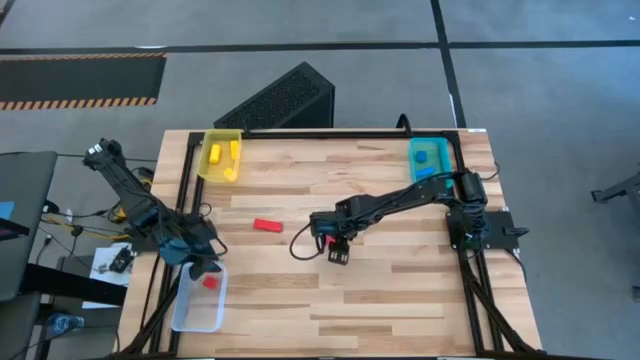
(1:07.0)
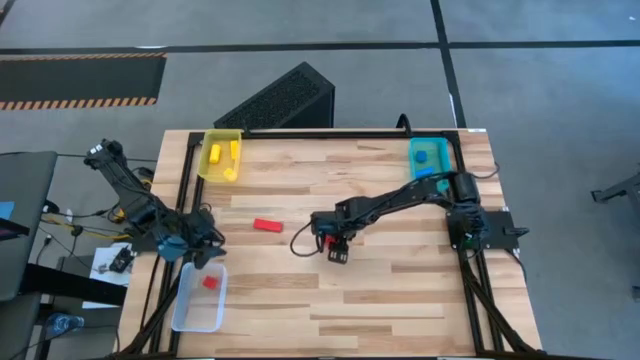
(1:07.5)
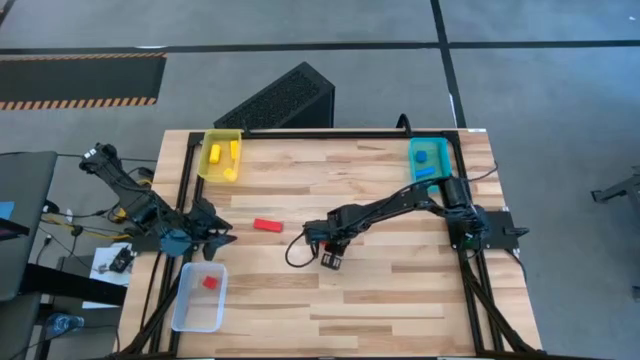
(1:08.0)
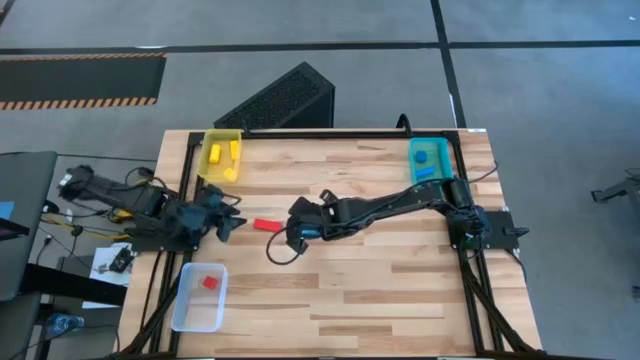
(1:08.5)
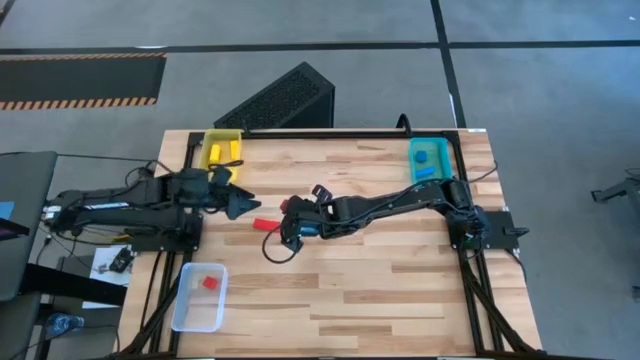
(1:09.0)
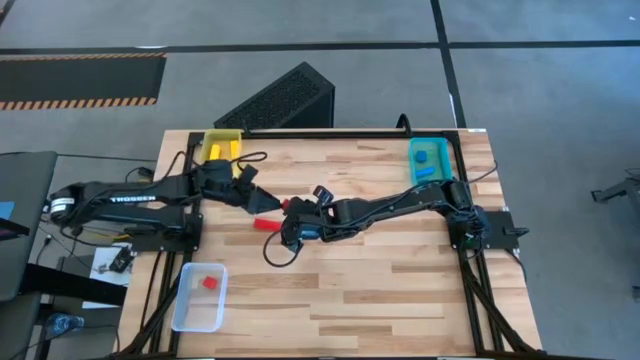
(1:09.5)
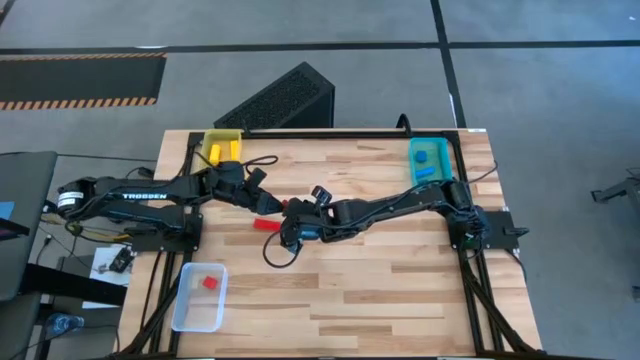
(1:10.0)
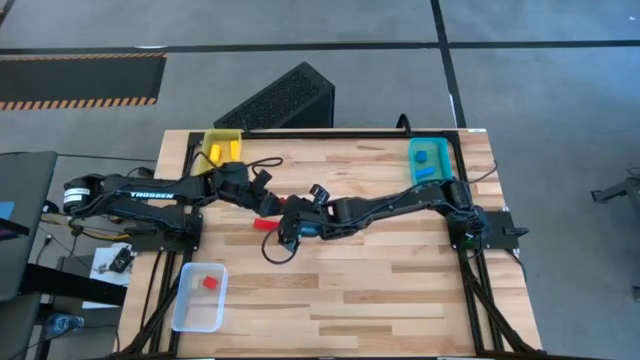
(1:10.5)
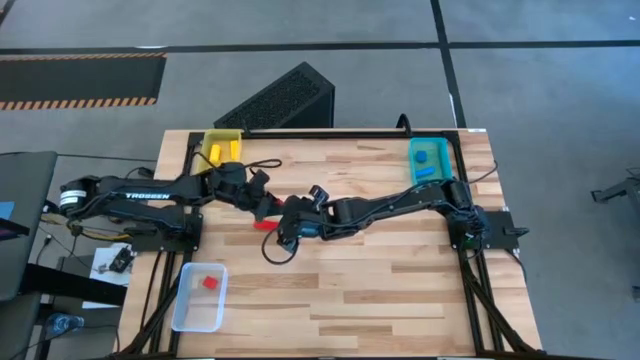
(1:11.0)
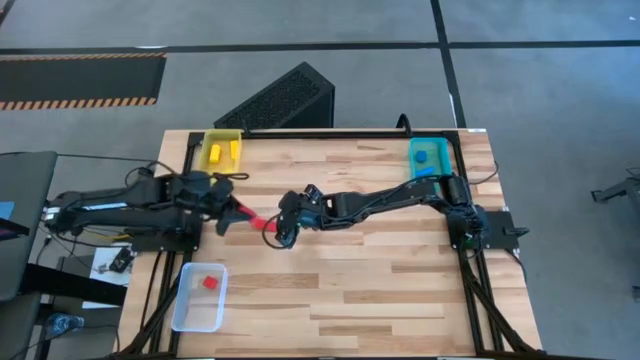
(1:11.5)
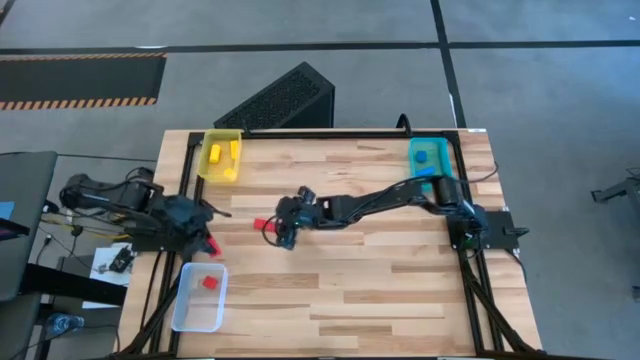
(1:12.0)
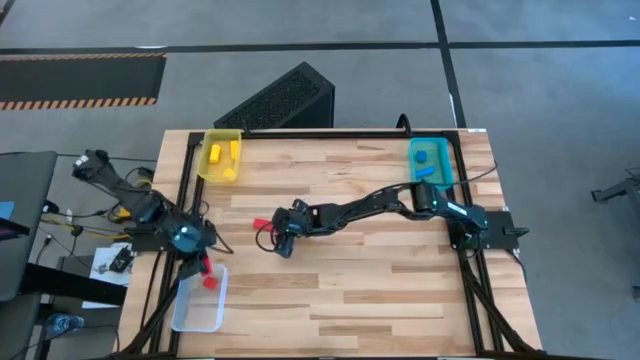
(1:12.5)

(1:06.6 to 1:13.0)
Task: Sort & place blocks by color
Put the right red rectangle wooden block into the transparent bin

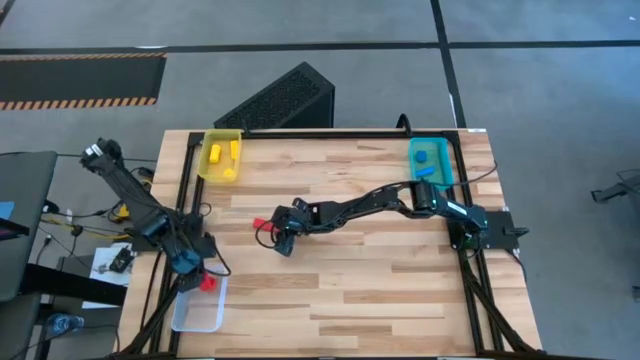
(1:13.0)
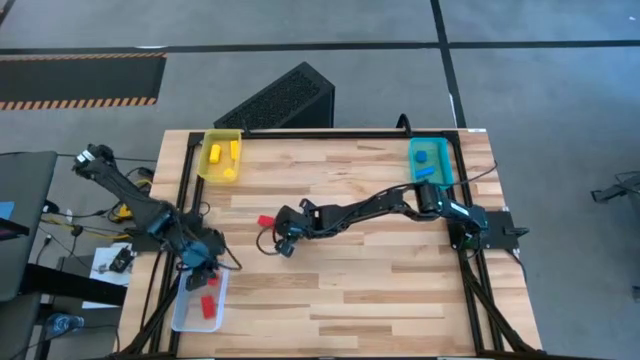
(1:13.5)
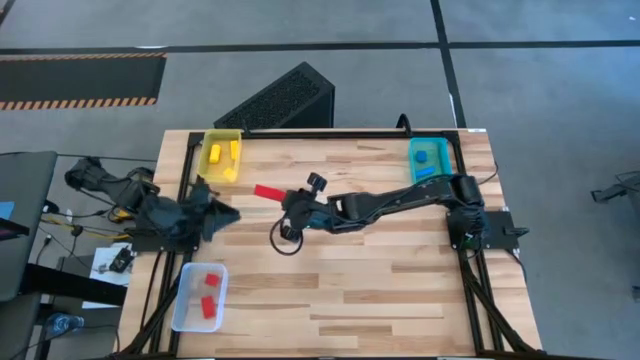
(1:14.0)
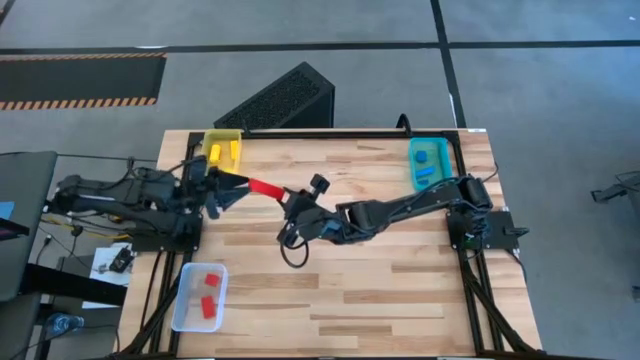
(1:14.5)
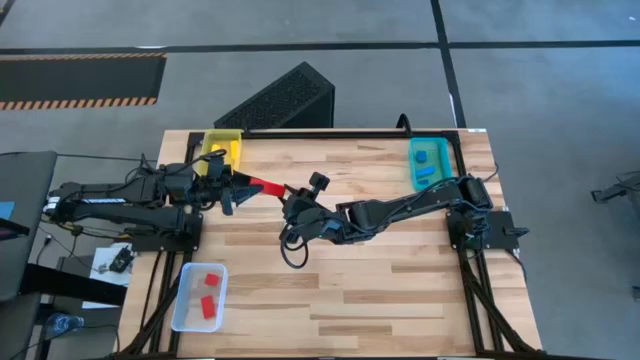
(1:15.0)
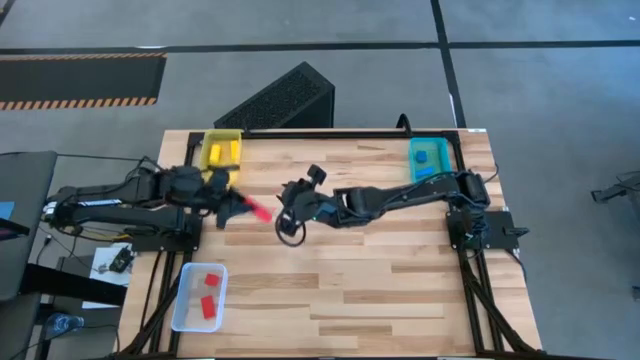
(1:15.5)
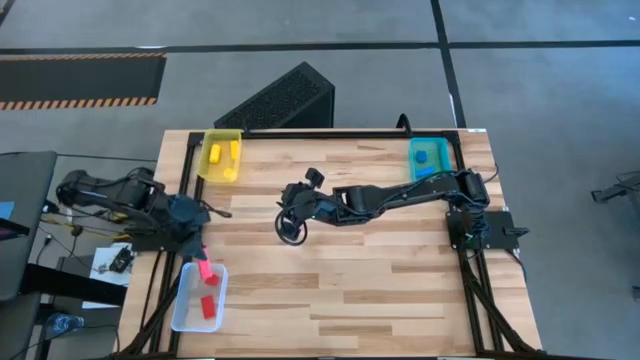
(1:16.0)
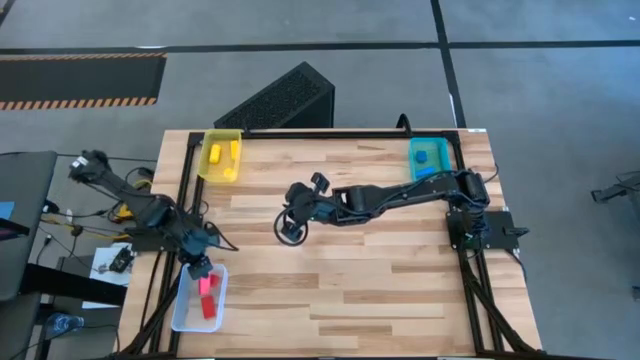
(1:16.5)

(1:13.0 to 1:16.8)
Put the red rectangle wooden block into the transparent bin

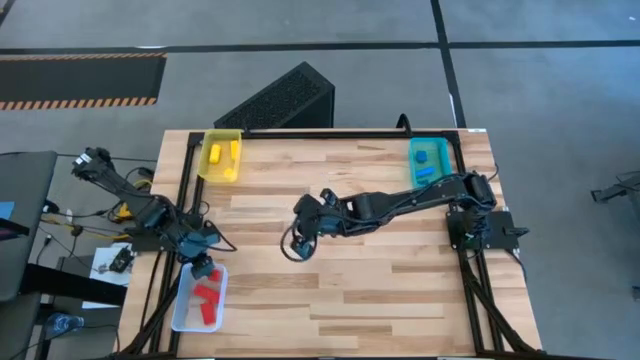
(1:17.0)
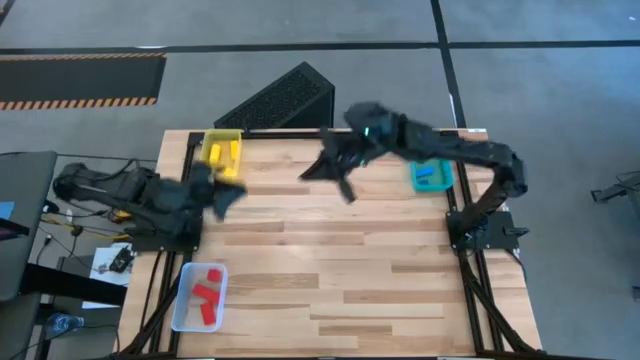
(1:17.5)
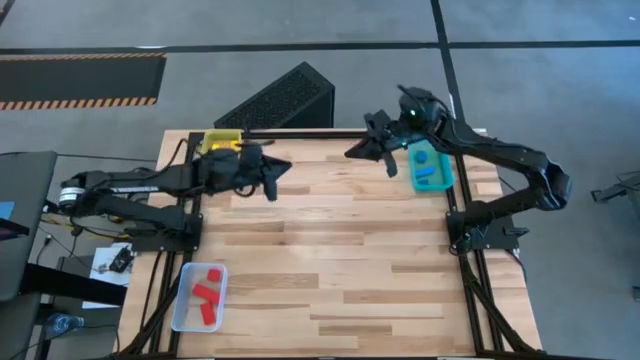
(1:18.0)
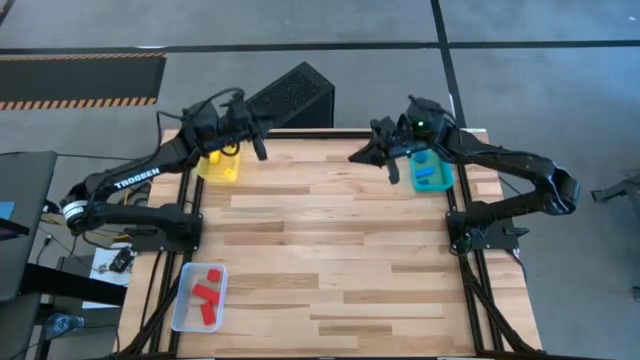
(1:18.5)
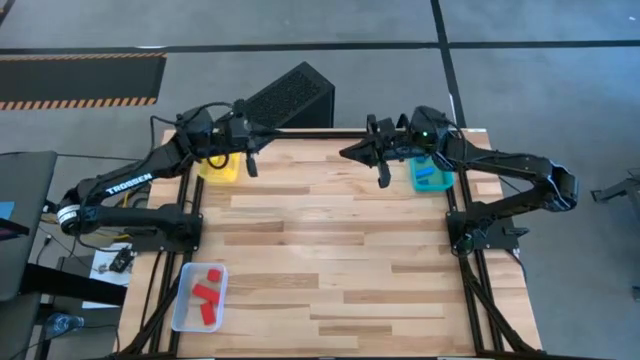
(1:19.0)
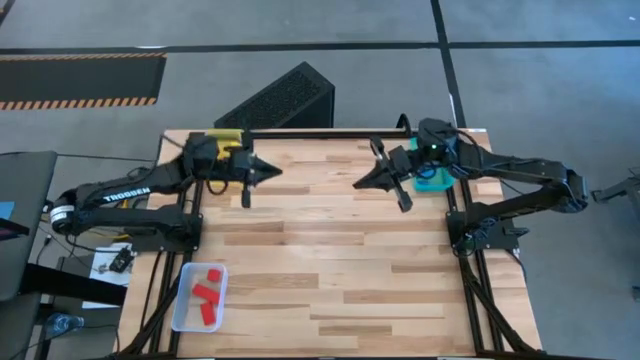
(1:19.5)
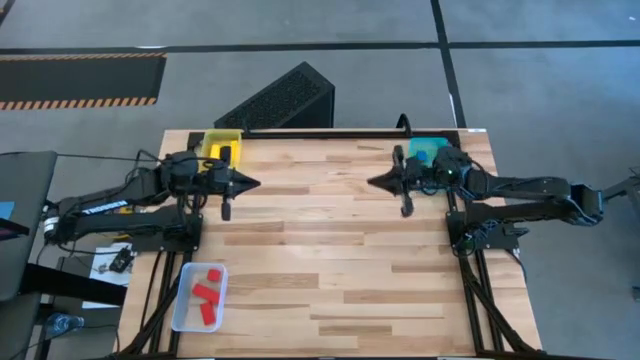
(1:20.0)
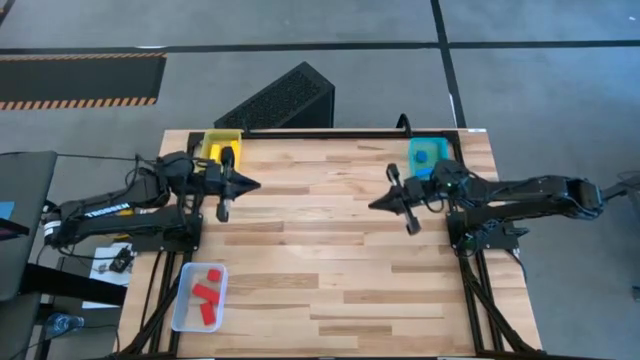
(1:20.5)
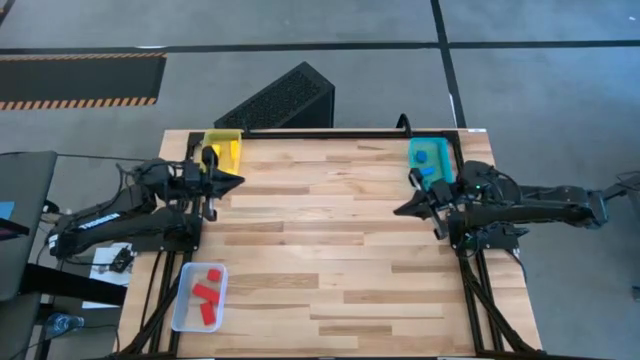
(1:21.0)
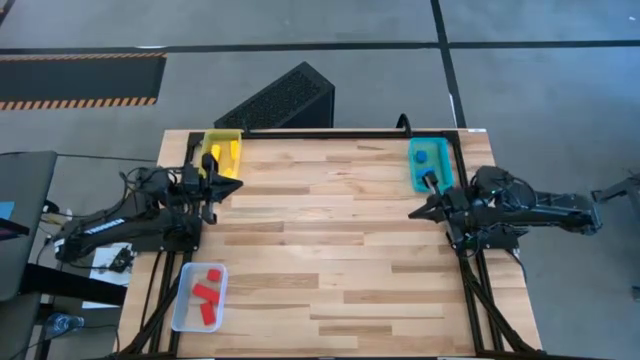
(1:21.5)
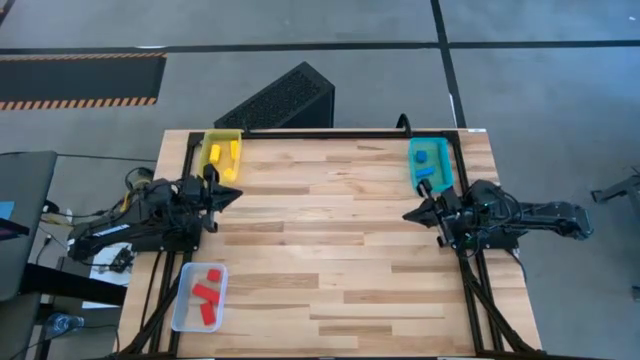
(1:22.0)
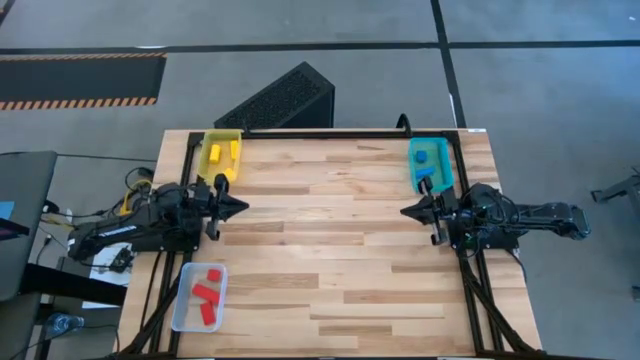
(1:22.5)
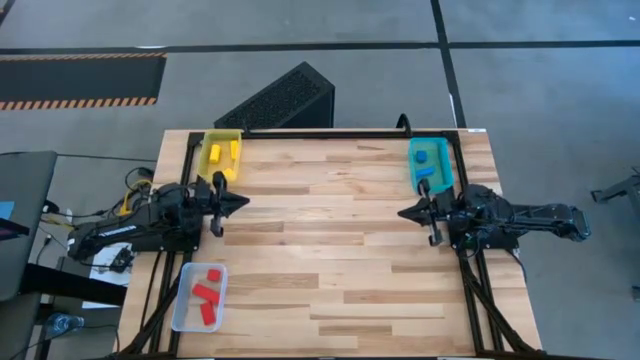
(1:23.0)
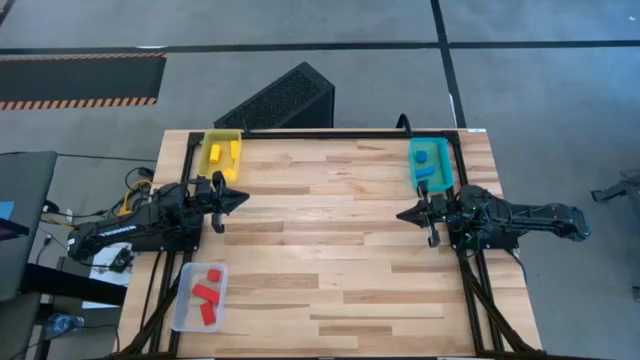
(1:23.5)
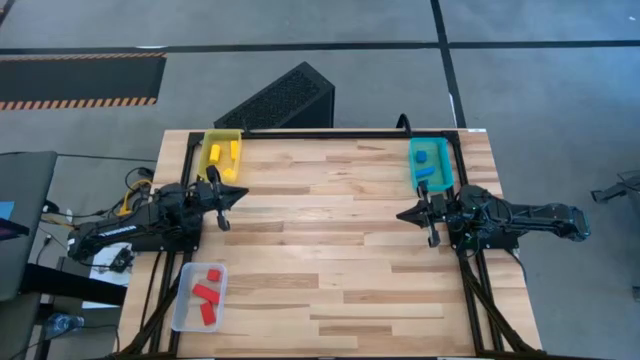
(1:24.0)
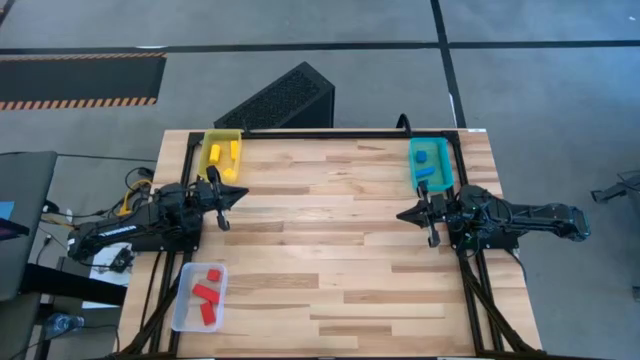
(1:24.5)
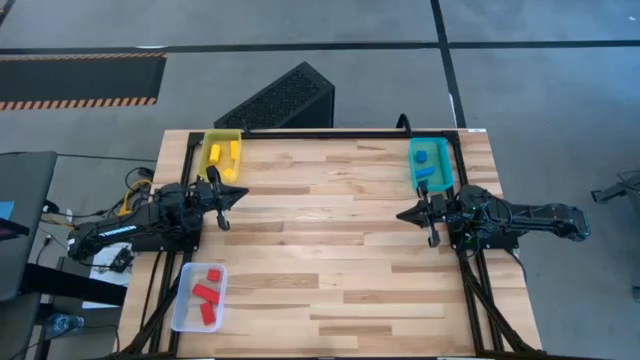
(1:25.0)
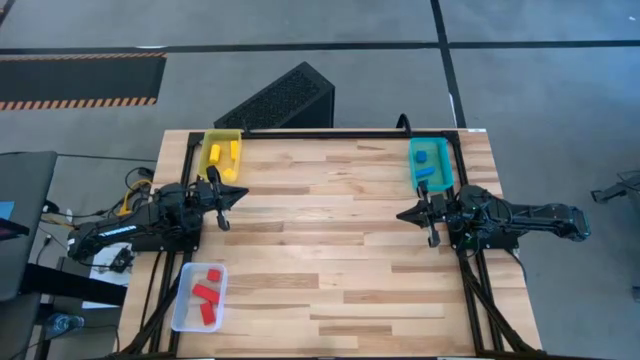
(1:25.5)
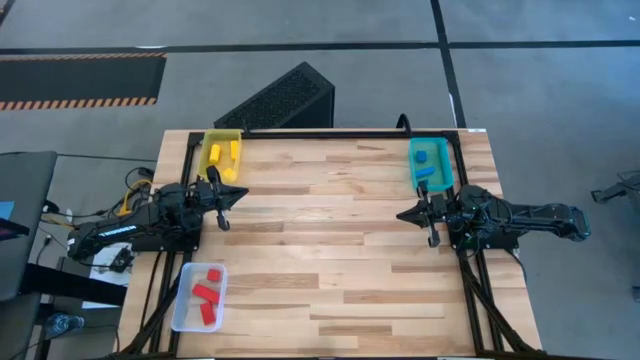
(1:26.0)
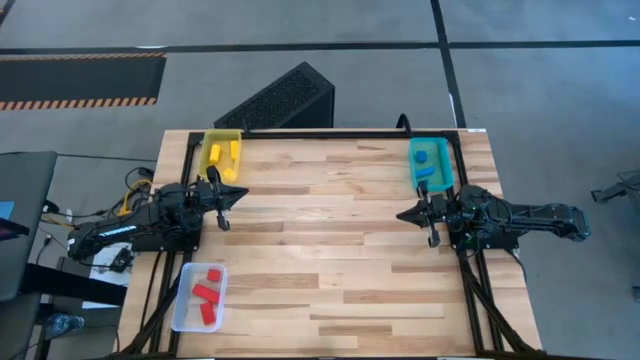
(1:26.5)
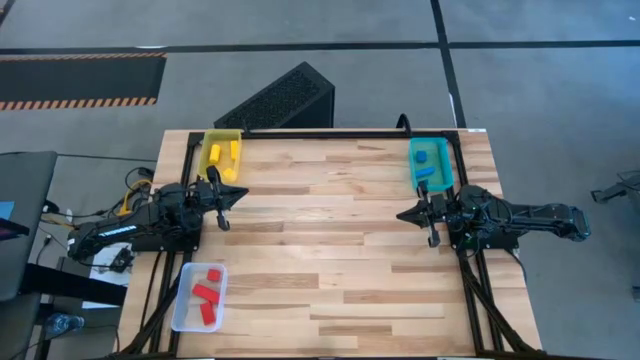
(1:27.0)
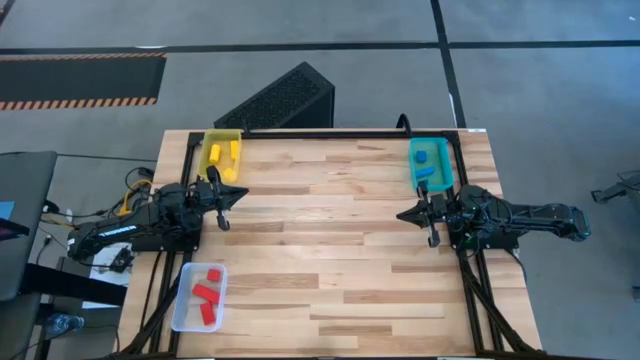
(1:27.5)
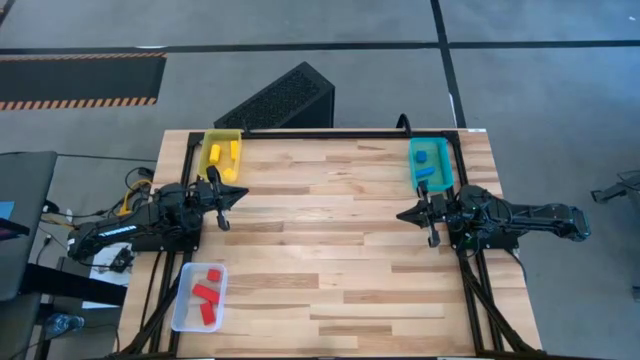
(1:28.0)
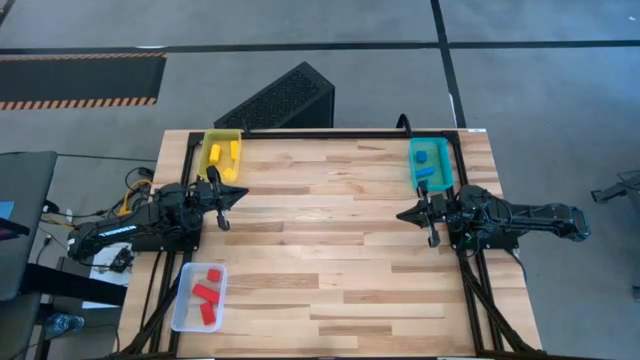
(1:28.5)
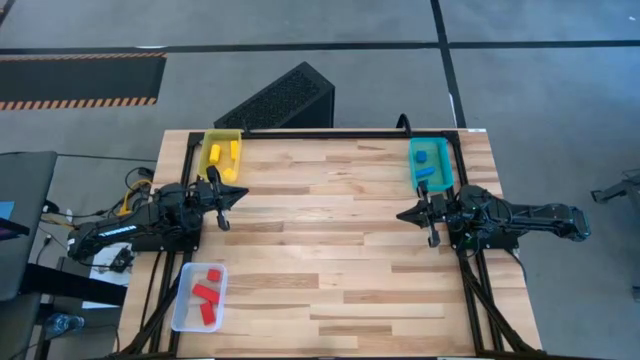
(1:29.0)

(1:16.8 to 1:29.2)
Return to Home Position
